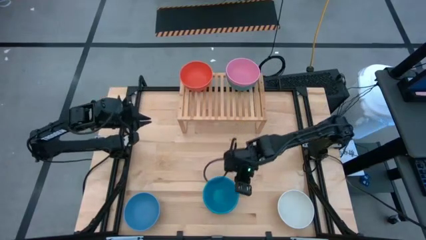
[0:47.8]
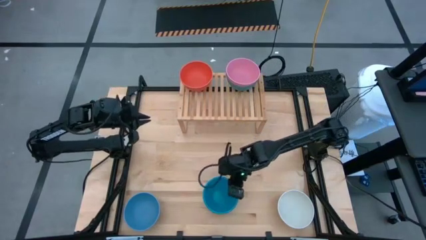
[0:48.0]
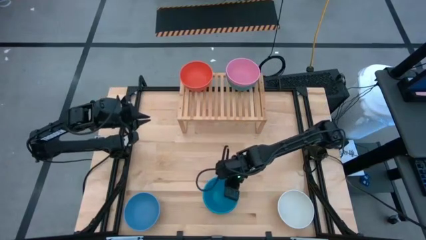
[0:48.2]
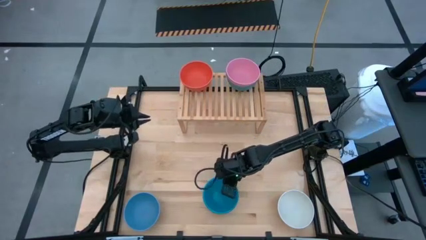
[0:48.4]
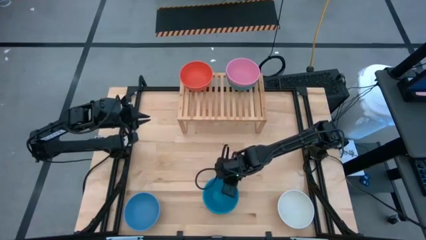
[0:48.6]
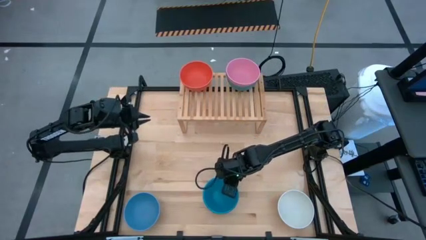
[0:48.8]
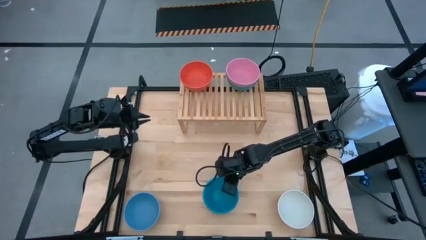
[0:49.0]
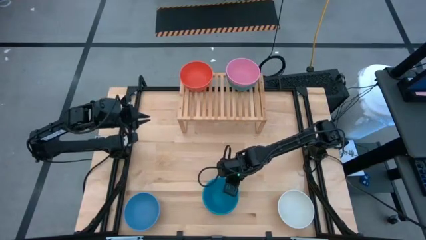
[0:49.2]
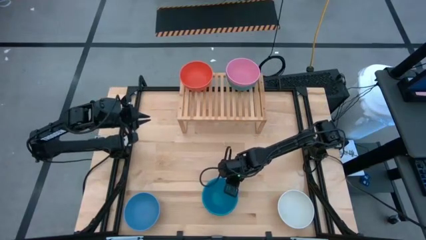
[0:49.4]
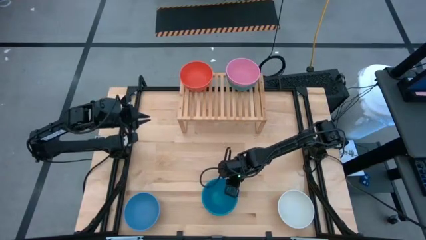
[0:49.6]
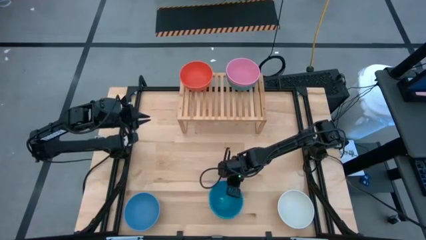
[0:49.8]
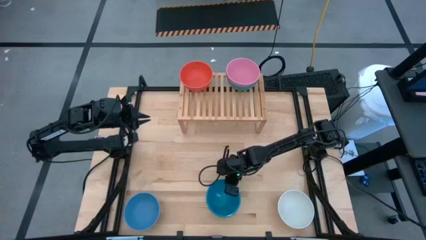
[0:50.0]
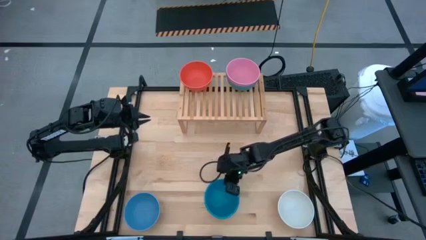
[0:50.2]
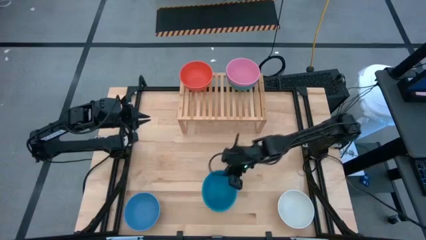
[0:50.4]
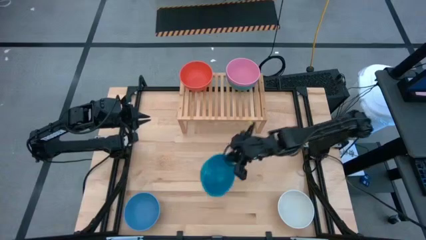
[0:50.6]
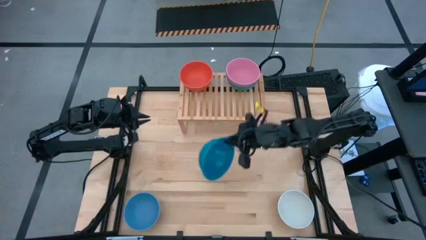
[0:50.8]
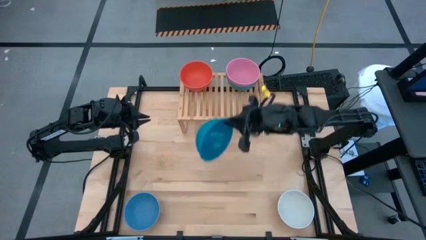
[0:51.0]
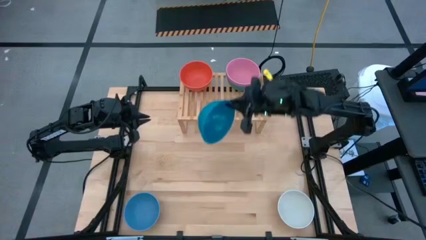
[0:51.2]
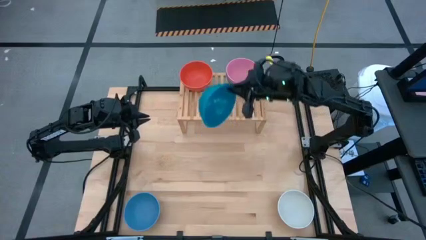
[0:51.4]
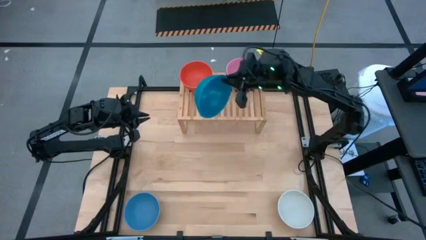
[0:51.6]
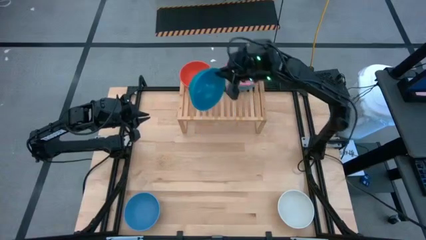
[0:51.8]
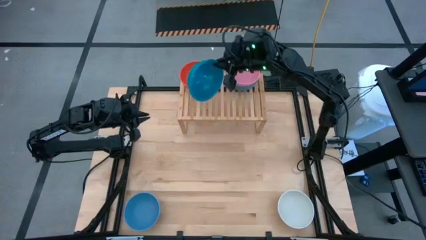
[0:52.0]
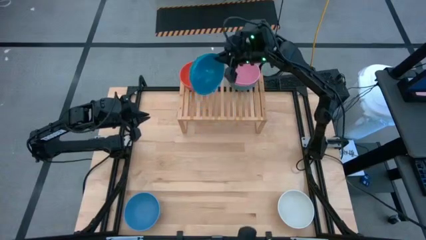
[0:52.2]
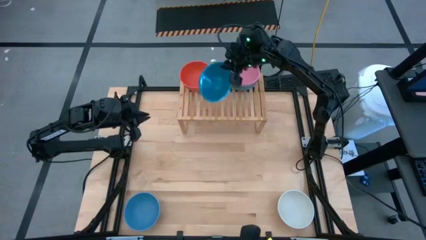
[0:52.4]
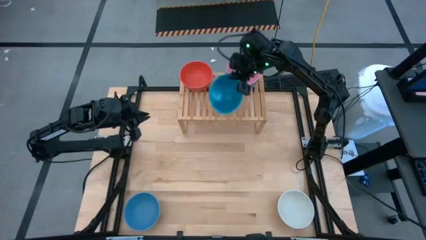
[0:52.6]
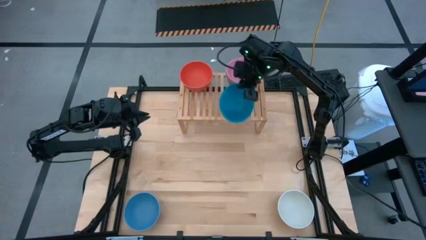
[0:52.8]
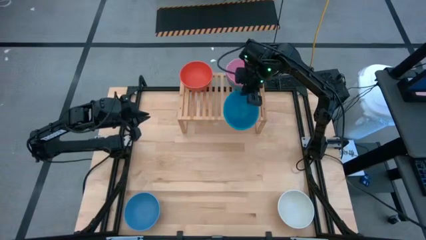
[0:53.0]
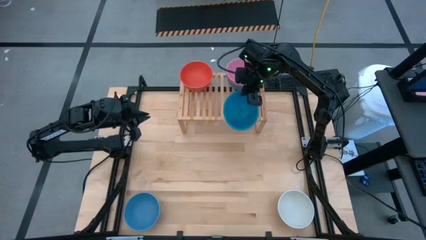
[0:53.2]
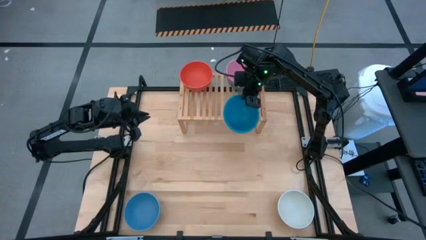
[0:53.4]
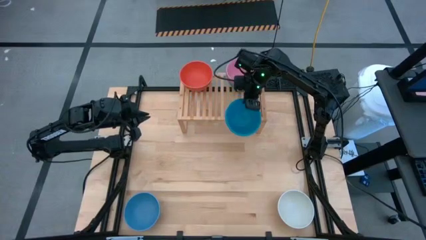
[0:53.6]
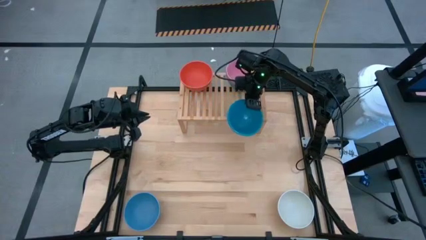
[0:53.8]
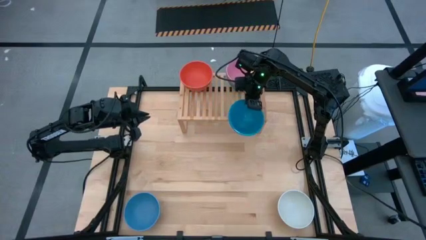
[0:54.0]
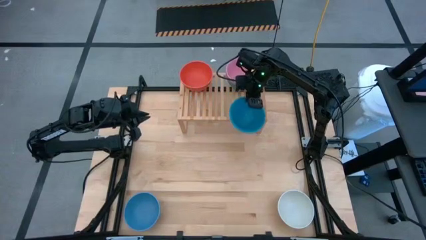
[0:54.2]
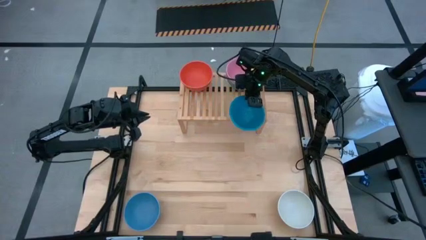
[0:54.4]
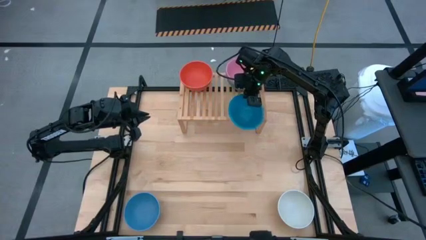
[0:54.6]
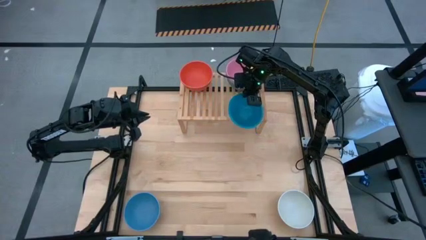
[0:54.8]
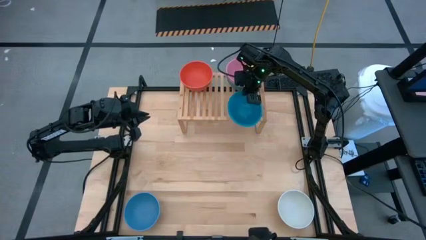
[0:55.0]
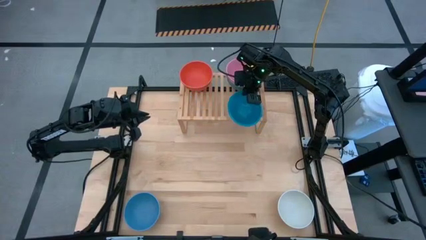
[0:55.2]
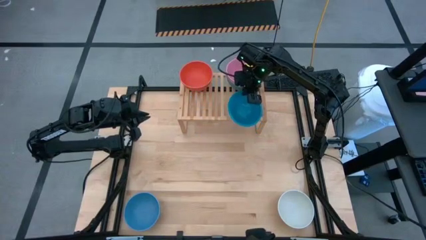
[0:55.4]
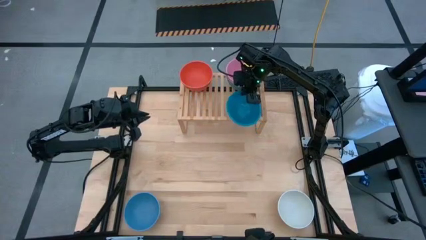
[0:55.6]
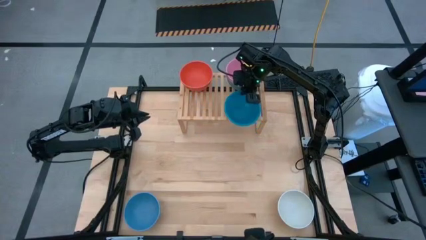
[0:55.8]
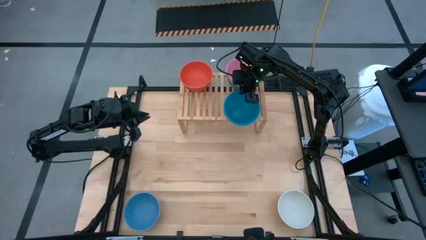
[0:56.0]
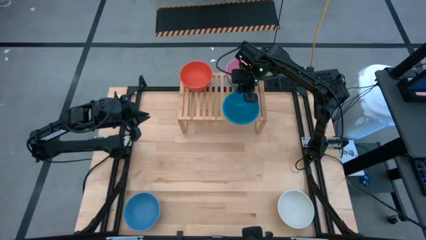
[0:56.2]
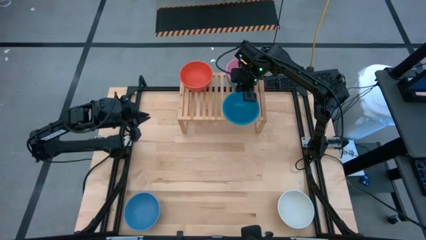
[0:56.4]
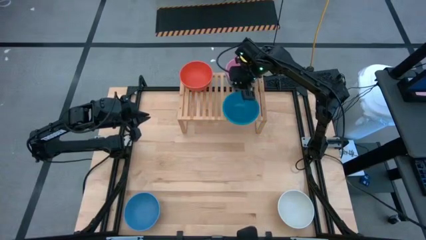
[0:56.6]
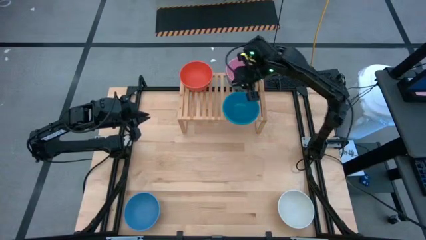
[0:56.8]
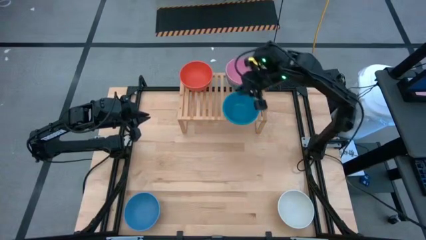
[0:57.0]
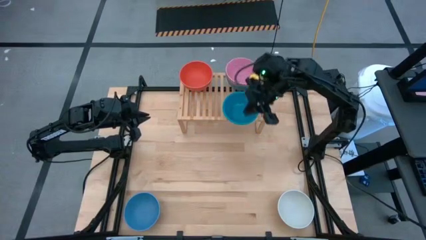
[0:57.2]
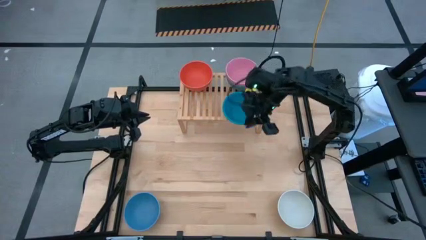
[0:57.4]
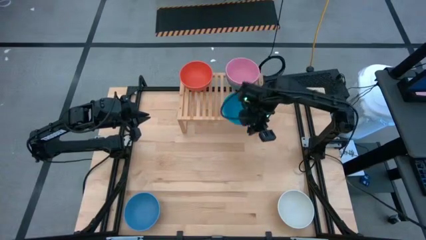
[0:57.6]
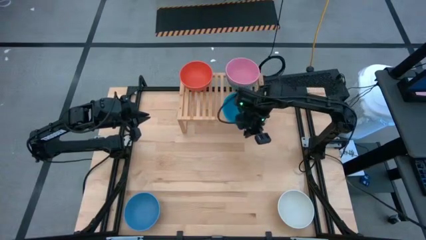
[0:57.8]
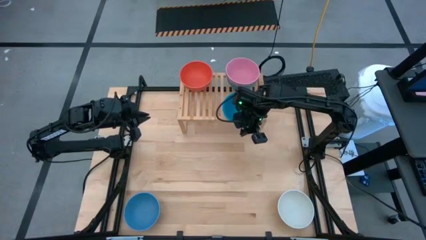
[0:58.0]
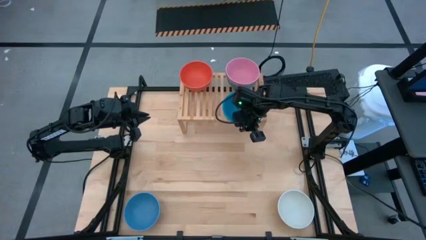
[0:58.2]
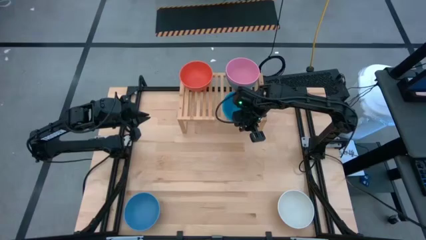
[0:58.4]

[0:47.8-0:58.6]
Task: Place and stack bowls onto a shelf
Put the dark blue bowl on the shelf
